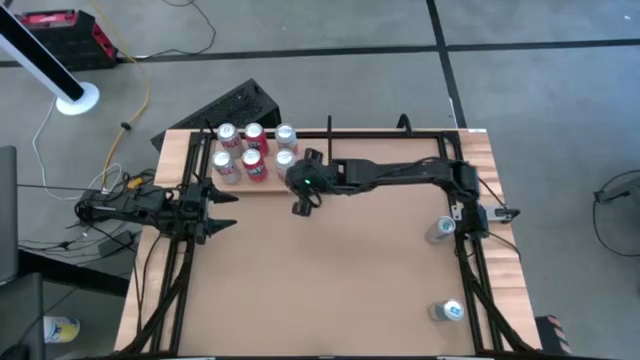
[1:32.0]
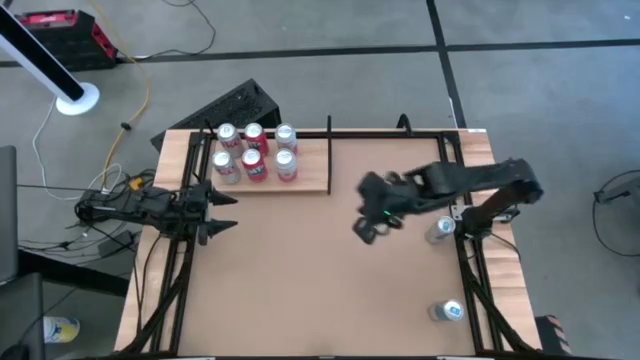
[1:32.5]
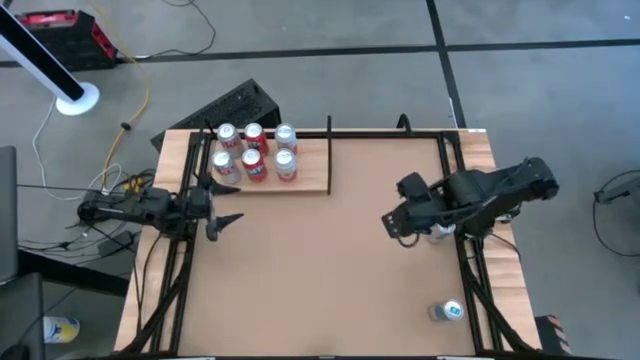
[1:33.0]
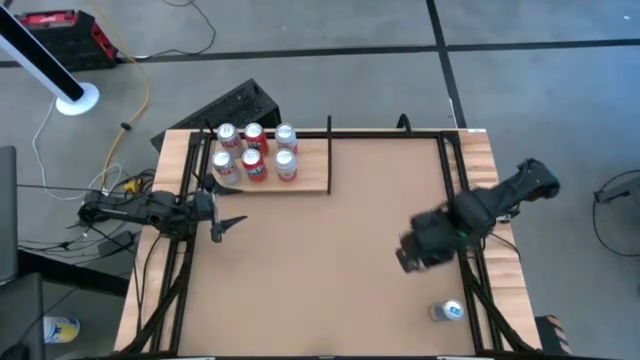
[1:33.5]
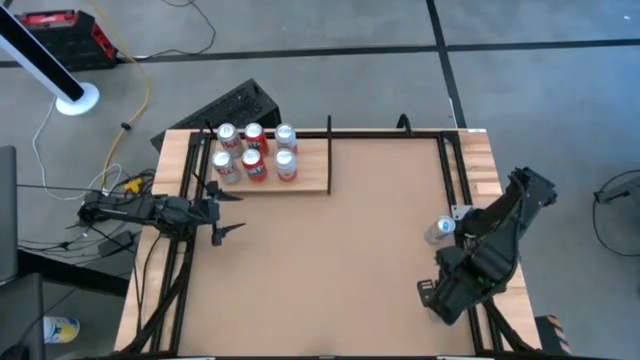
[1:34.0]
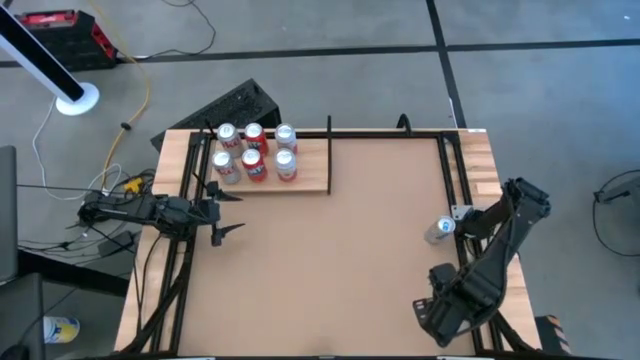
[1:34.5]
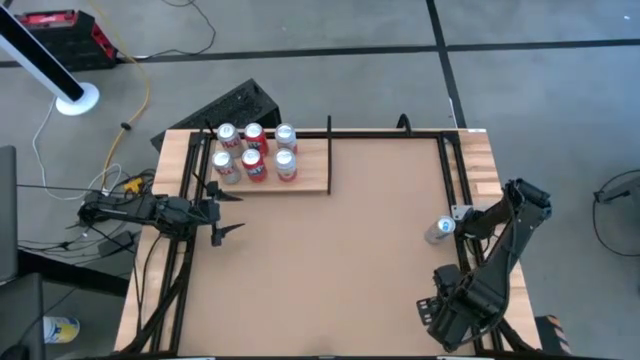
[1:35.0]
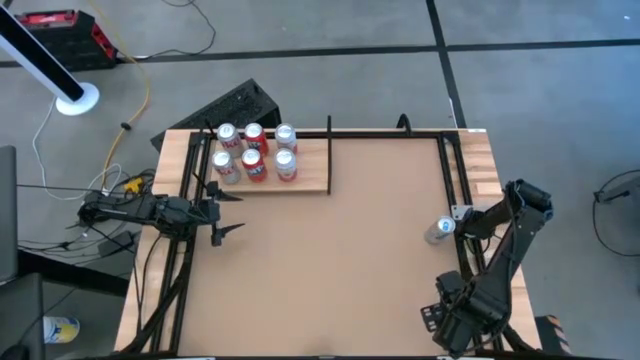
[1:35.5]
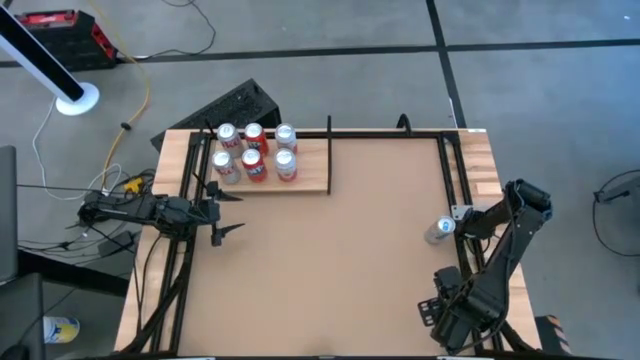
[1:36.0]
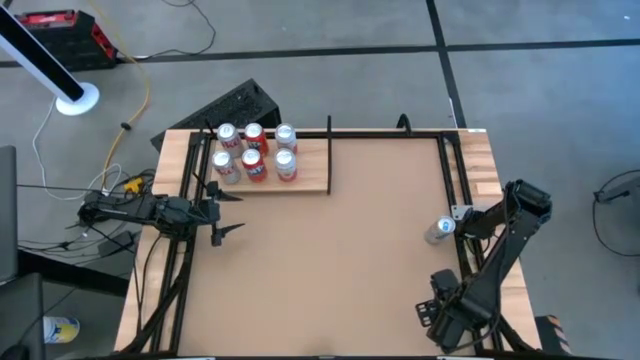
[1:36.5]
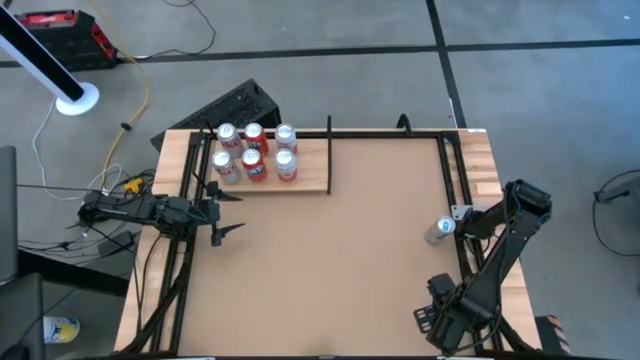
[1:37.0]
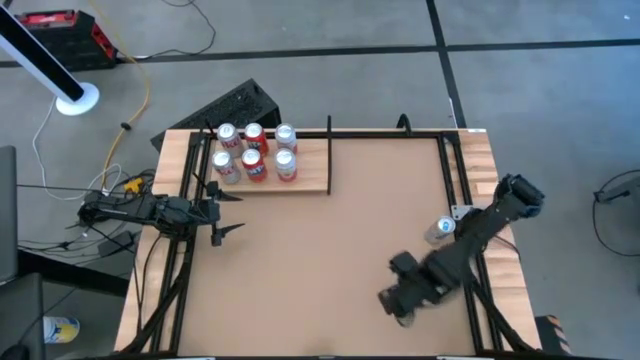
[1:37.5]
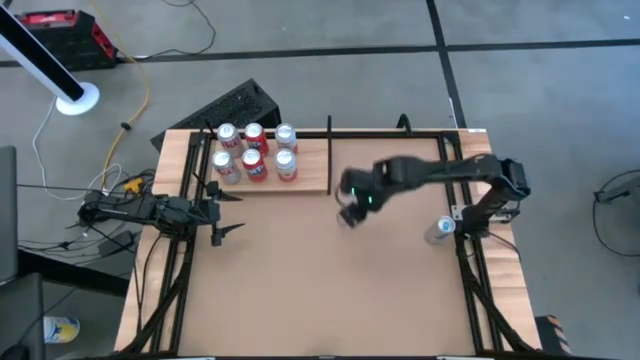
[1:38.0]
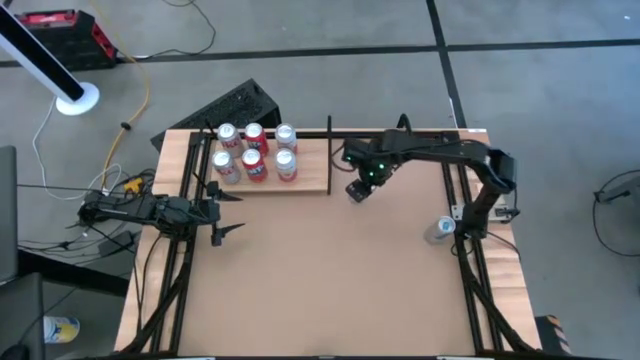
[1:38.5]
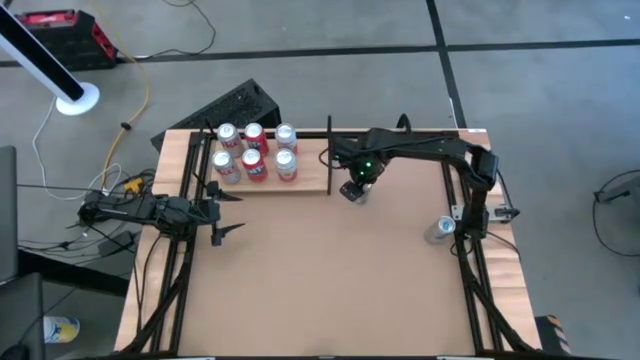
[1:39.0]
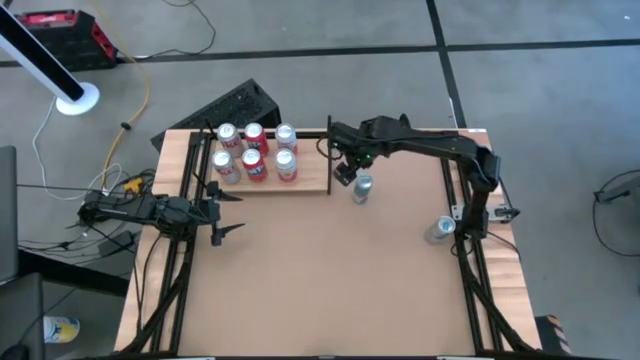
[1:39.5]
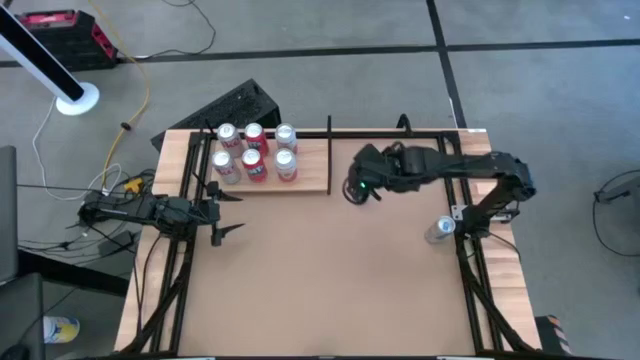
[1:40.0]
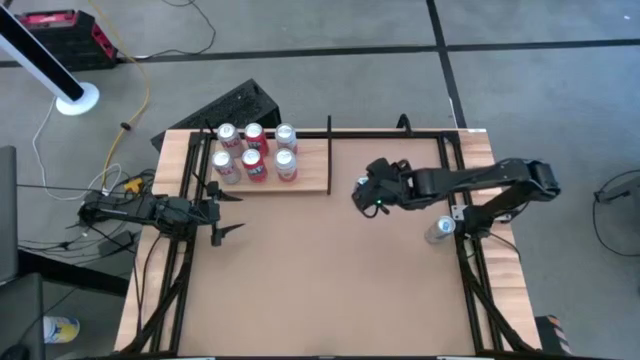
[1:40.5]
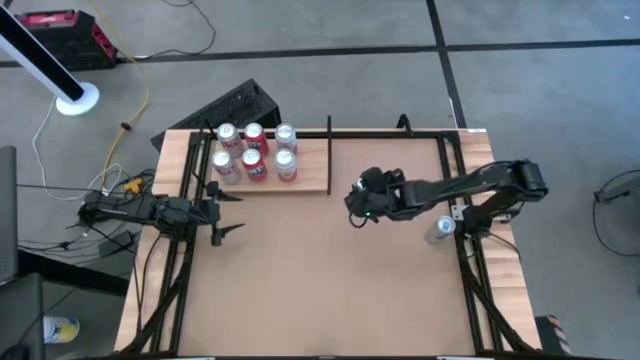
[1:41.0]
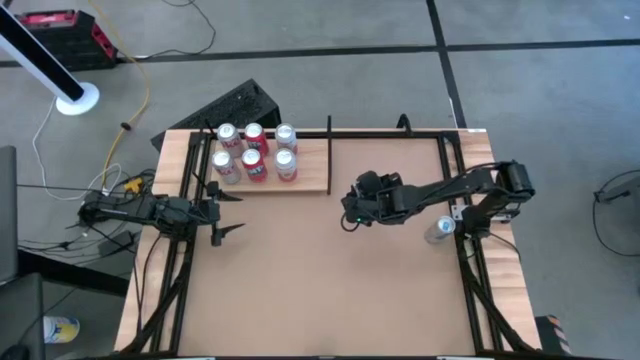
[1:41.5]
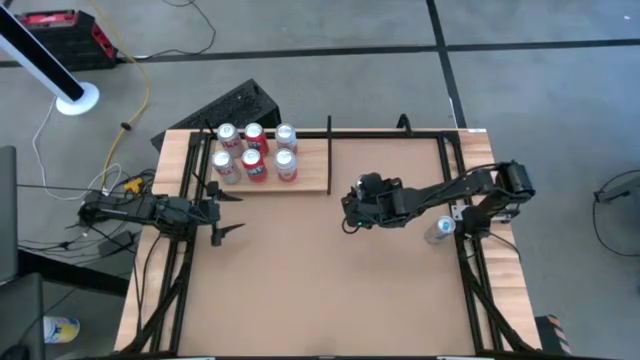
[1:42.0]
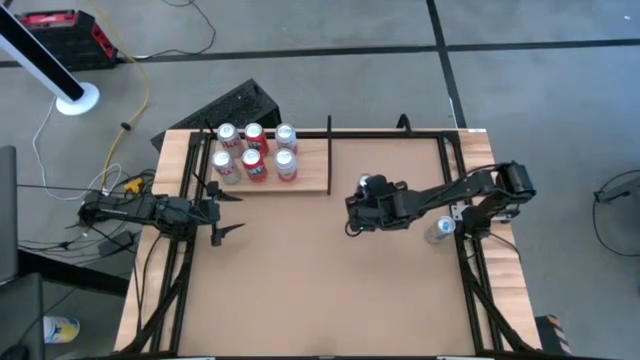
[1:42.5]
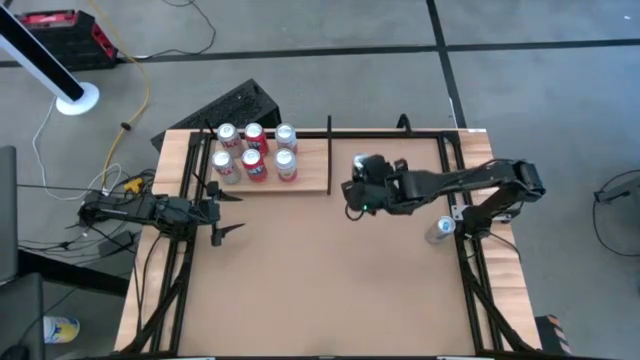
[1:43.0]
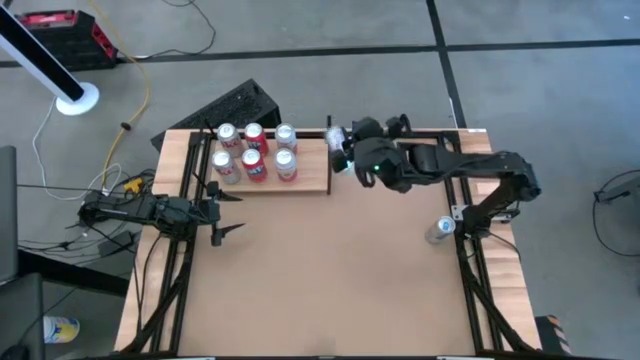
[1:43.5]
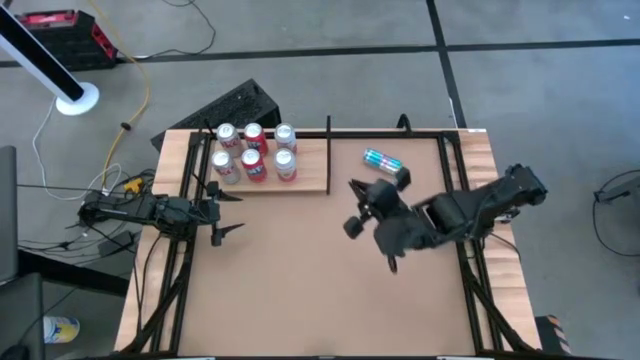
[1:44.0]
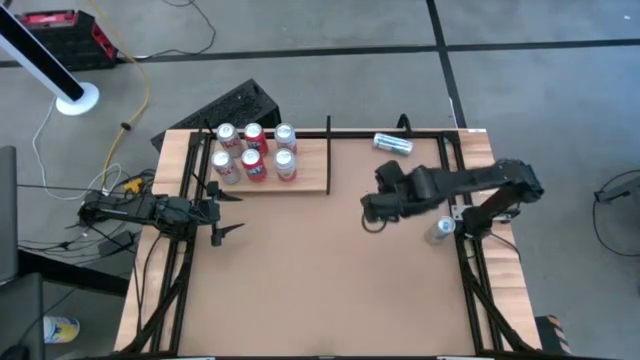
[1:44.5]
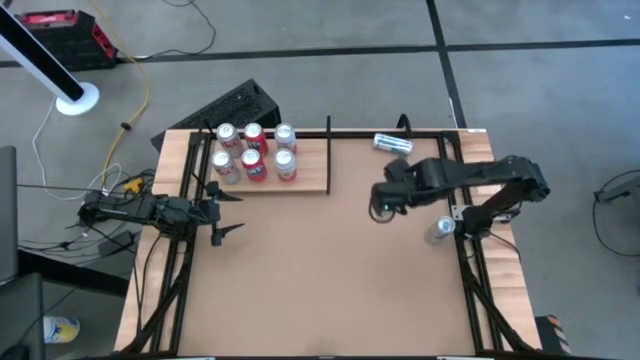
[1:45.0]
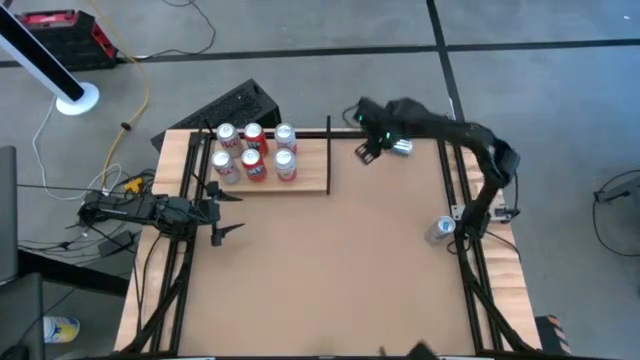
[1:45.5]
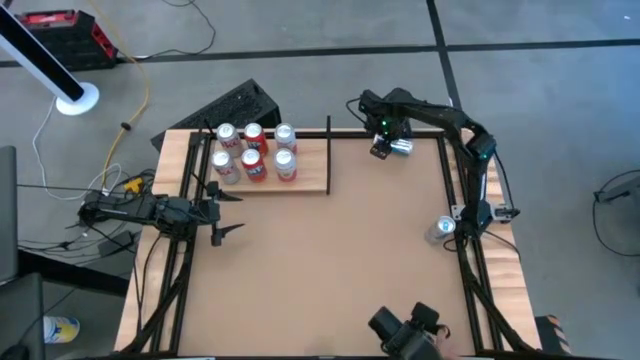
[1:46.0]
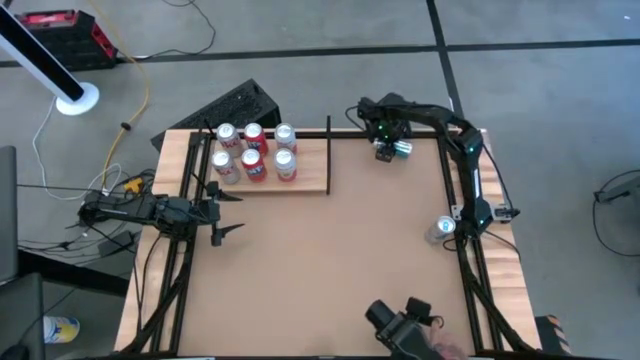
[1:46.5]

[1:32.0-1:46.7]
Task: Place canned beverage on shelf
Put the bottom blue soda can on the shelf

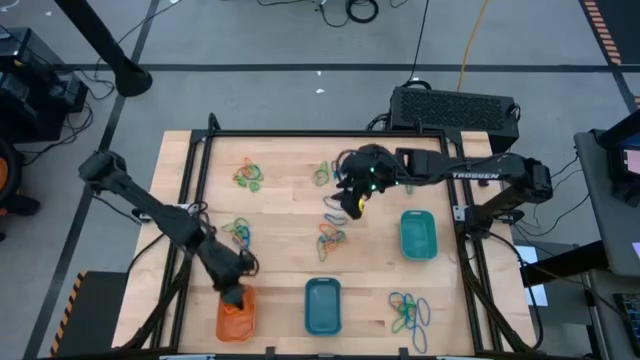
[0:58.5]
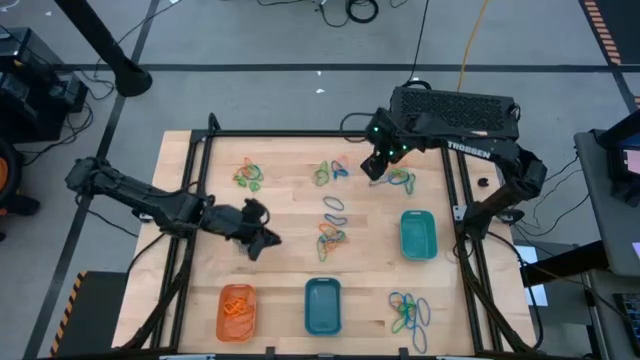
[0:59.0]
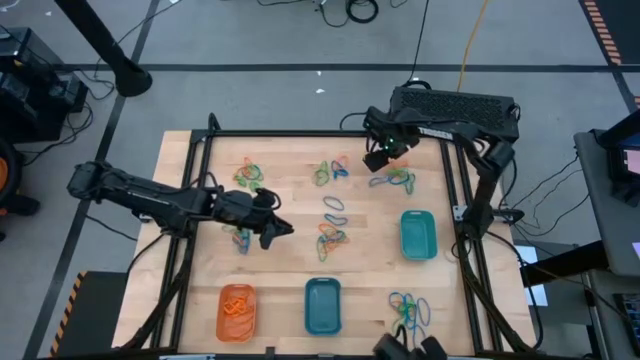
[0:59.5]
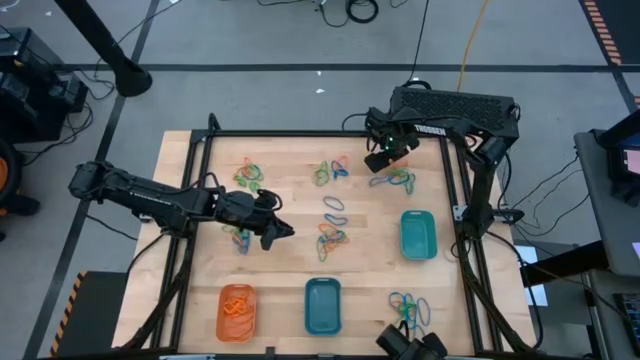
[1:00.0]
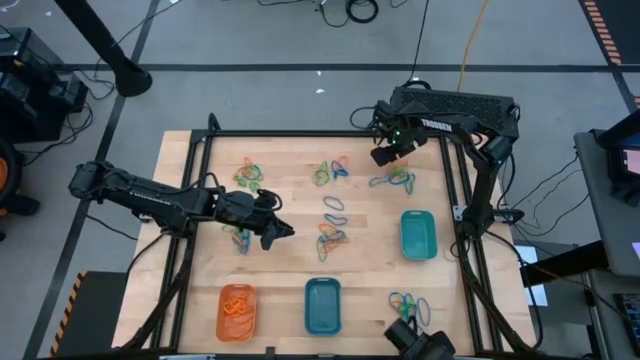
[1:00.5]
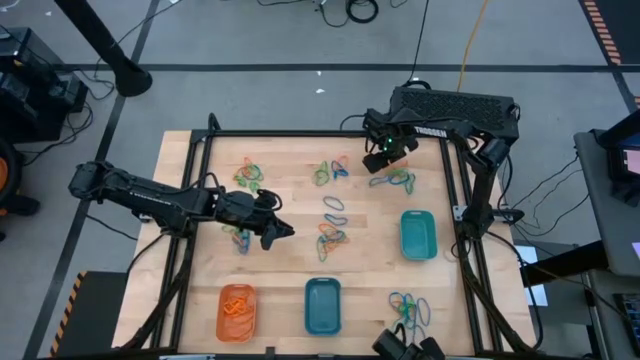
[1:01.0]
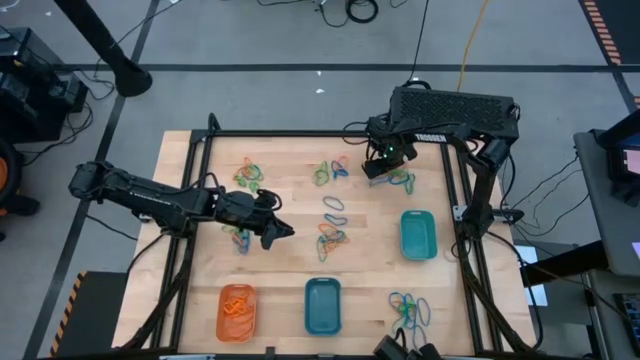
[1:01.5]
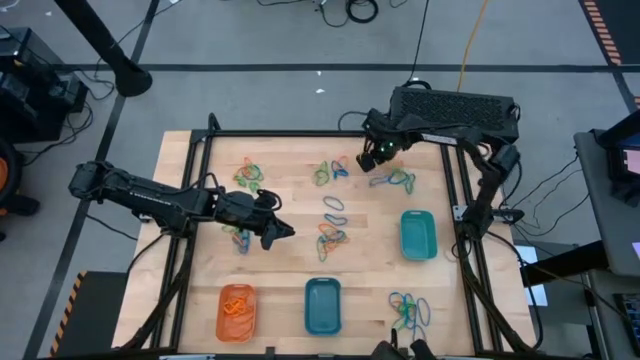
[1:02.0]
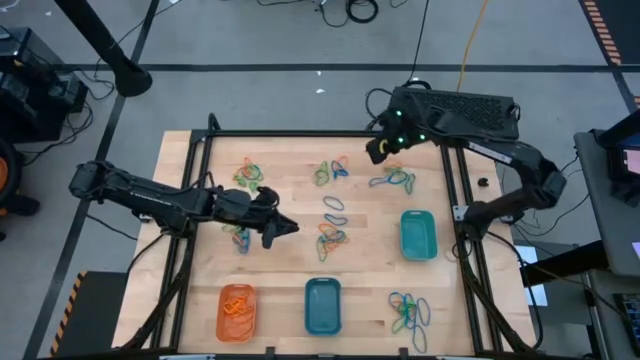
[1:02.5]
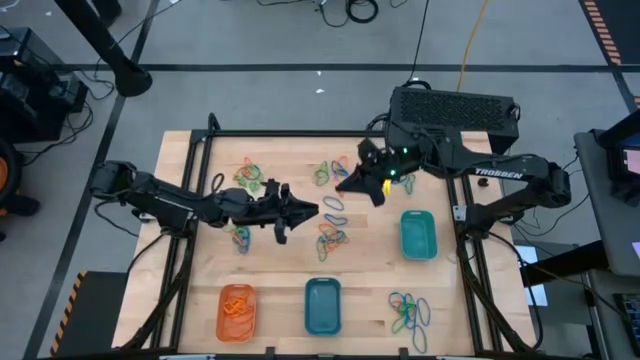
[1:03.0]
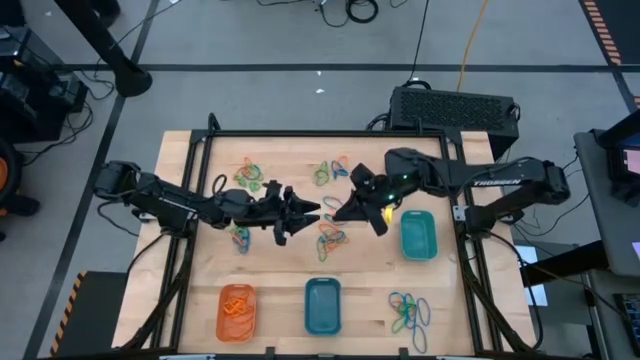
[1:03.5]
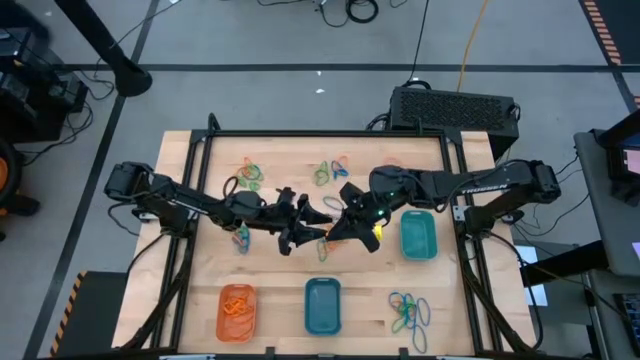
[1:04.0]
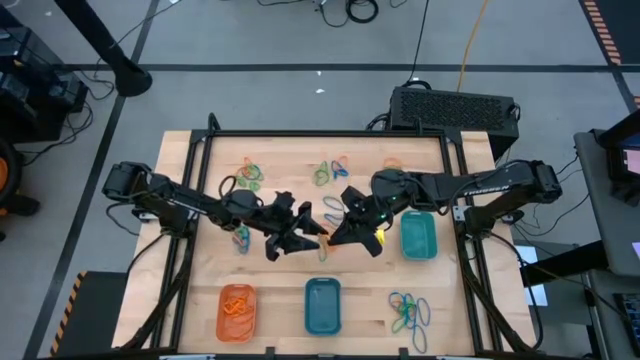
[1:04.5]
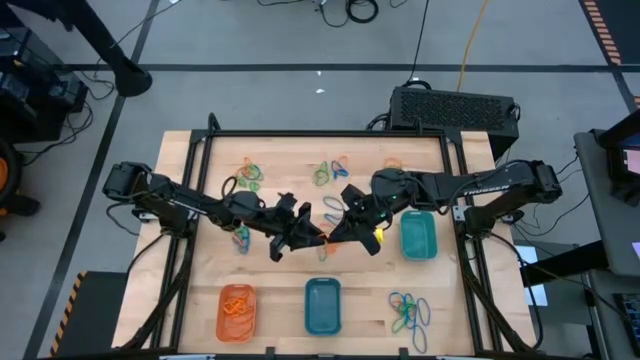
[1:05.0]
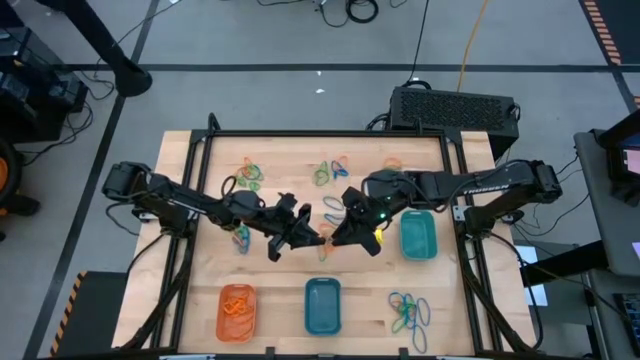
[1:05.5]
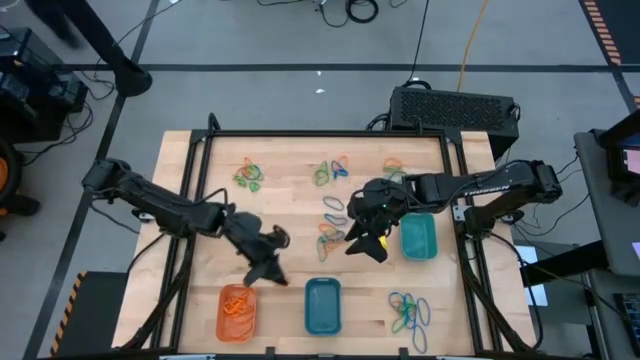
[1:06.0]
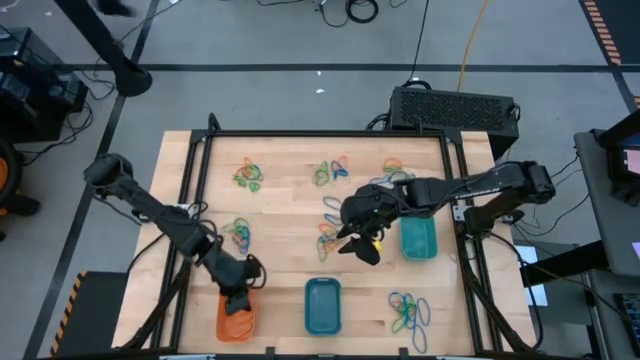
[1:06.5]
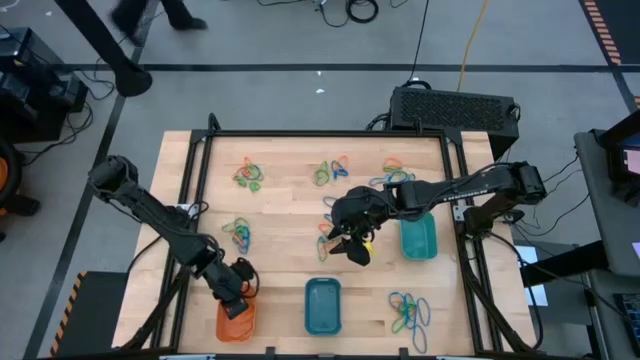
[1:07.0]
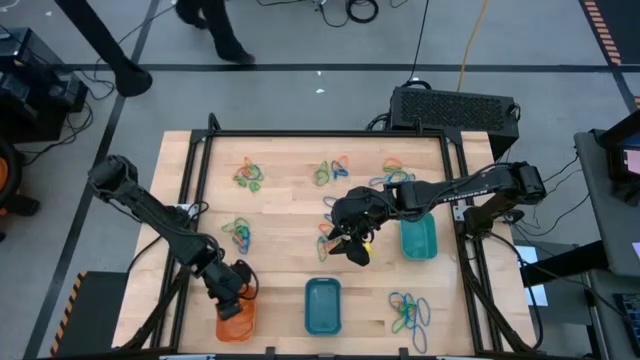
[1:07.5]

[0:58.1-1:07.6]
Task: Sort rubber bands into baskets
Put the orange rubber band into the orange bin
